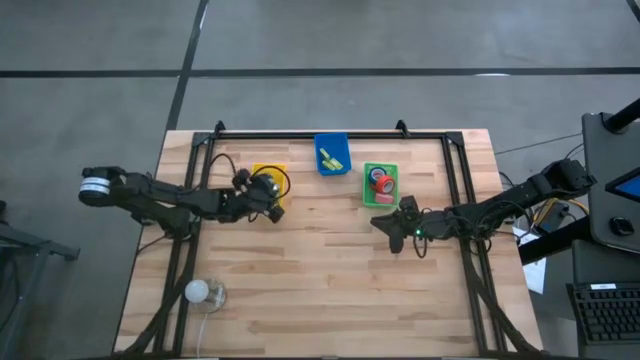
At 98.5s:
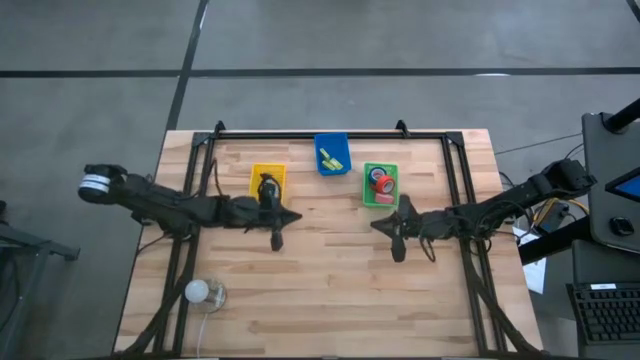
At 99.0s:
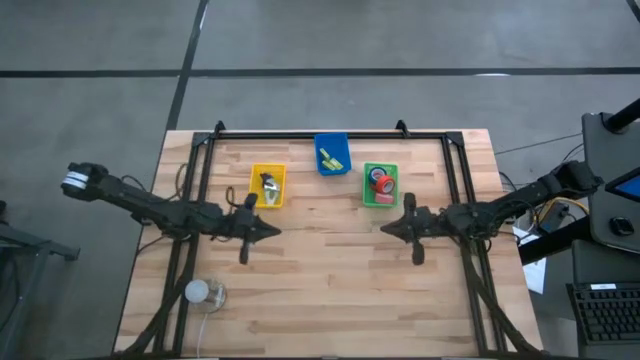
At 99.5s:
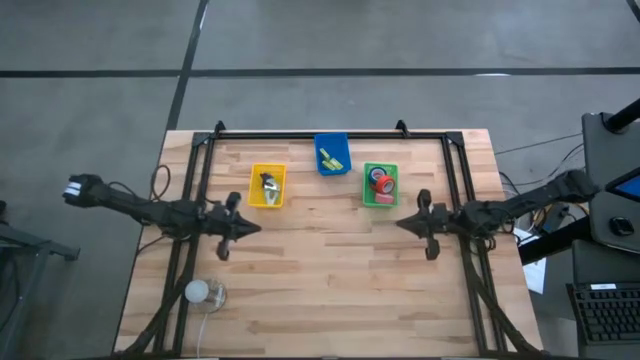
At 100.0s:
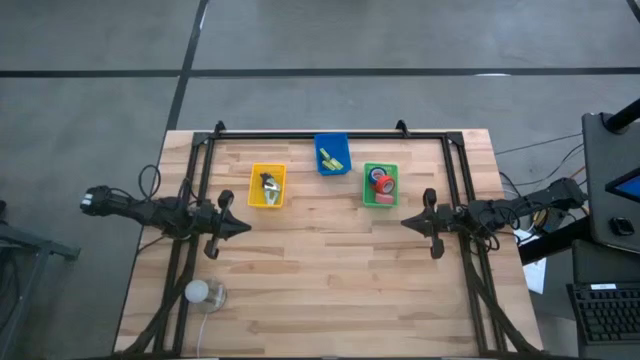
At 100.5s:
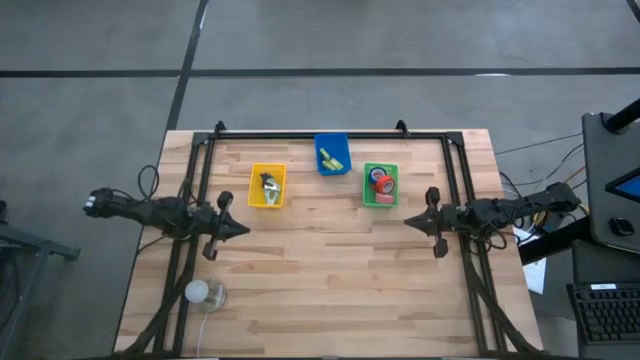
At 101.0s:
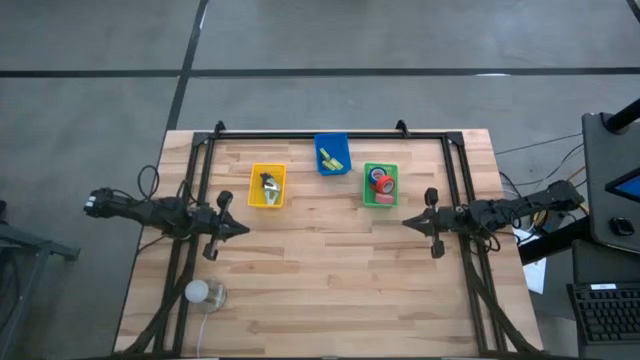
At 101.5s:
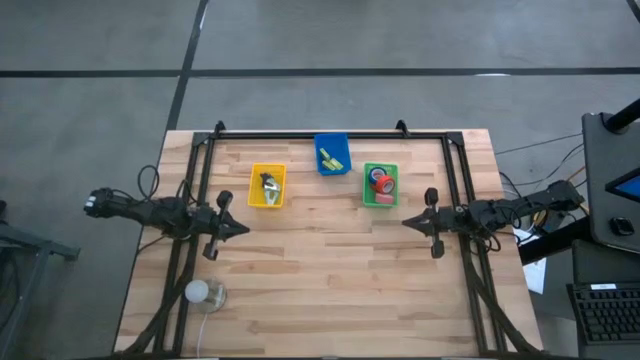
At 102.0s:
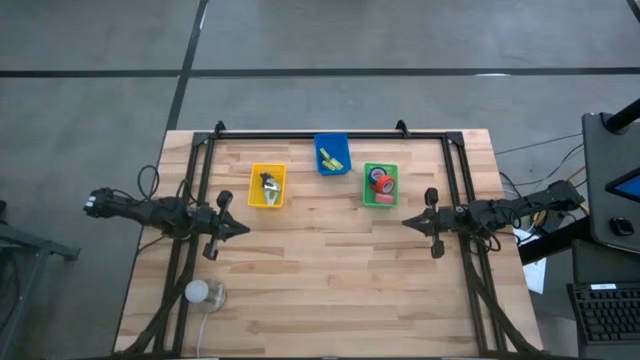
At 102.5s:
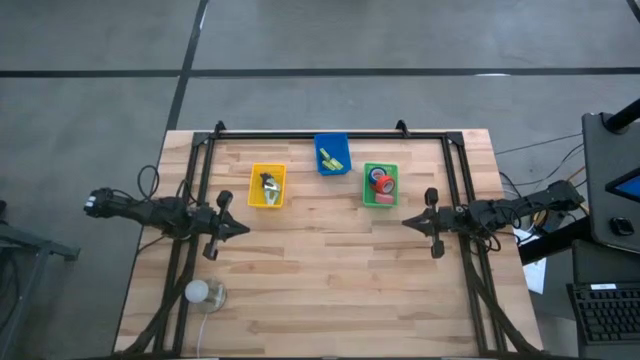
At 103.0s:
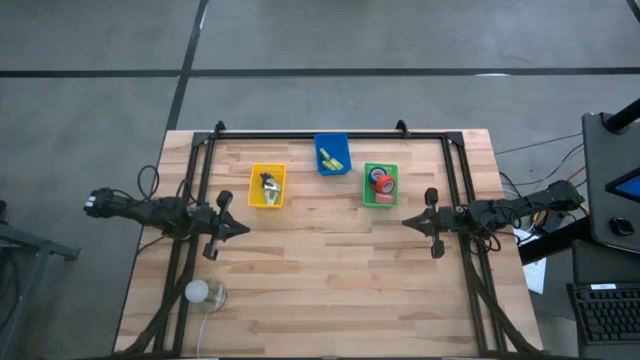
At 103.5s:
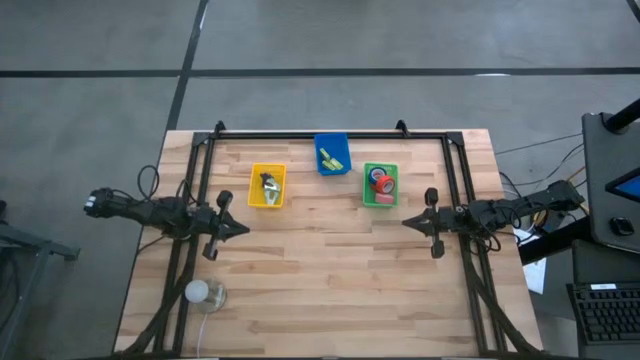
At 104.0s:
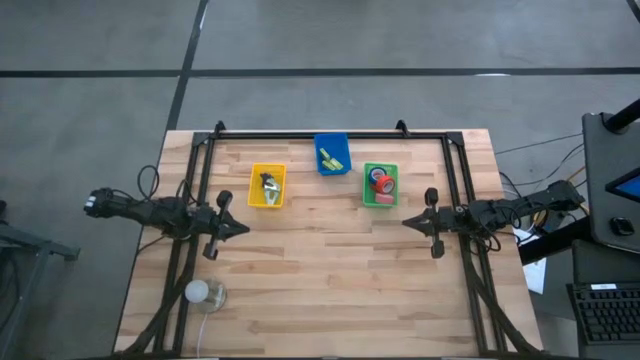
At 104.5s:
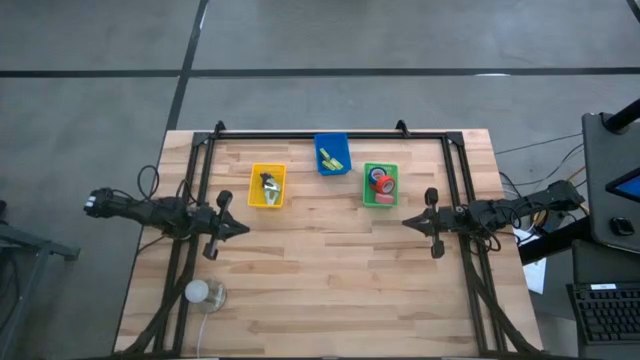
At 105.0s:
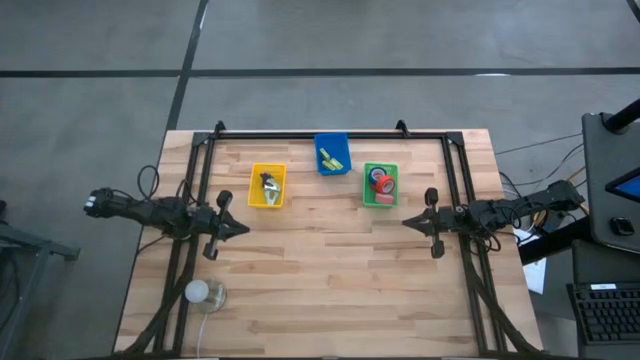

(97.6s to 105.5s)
Task: Pick and place Stapler, Stapler remover, tape
Return to Home Position

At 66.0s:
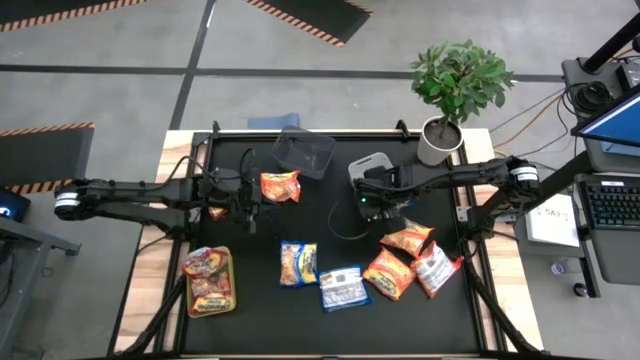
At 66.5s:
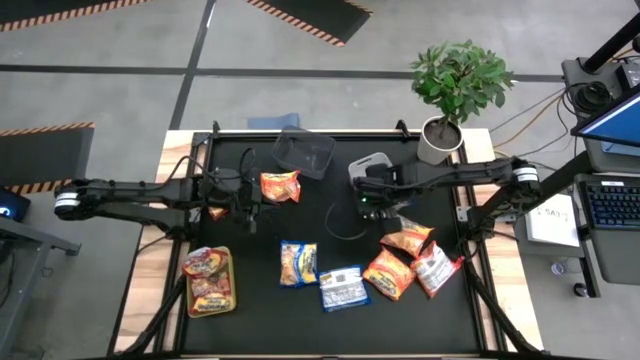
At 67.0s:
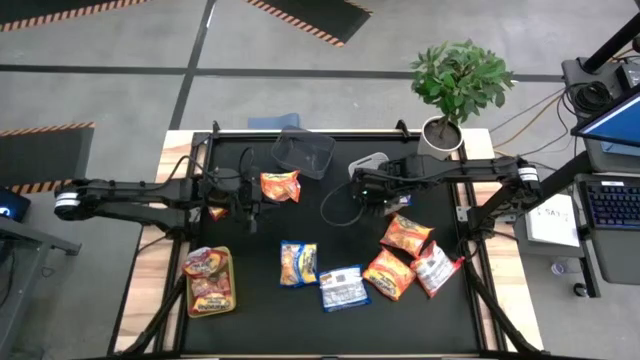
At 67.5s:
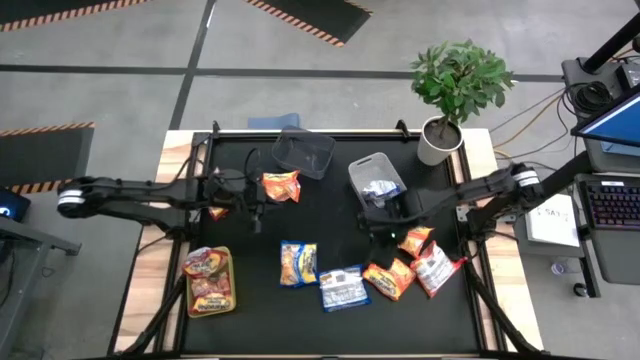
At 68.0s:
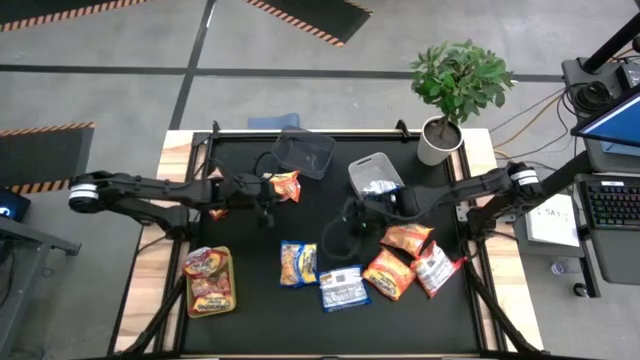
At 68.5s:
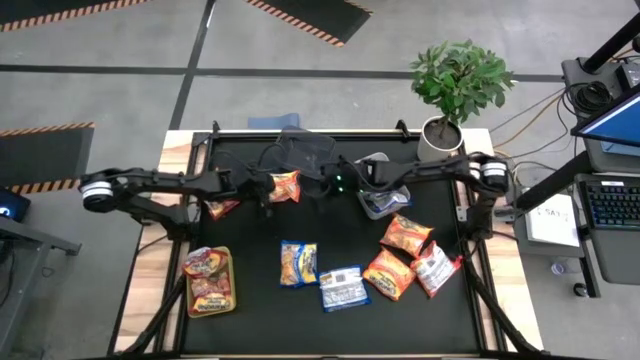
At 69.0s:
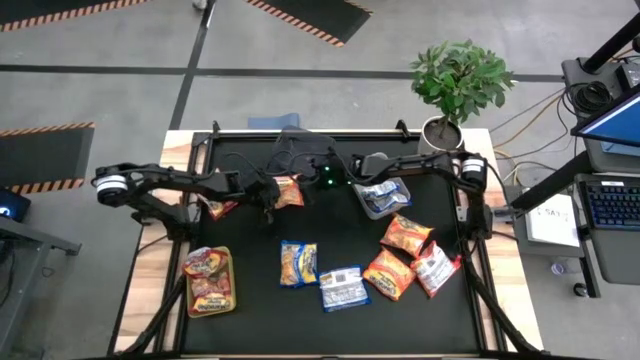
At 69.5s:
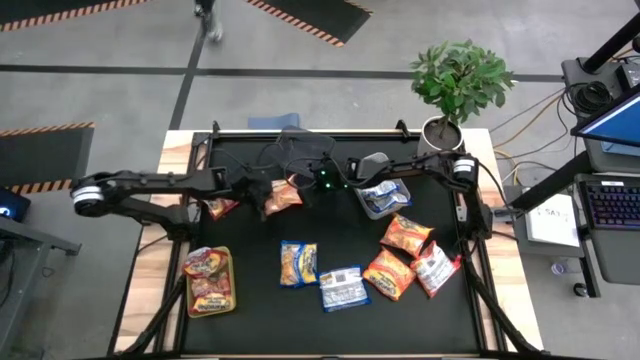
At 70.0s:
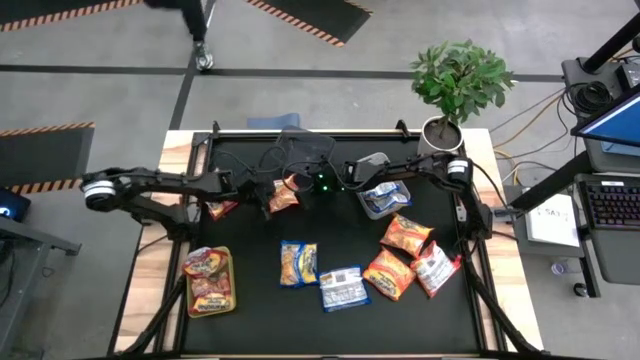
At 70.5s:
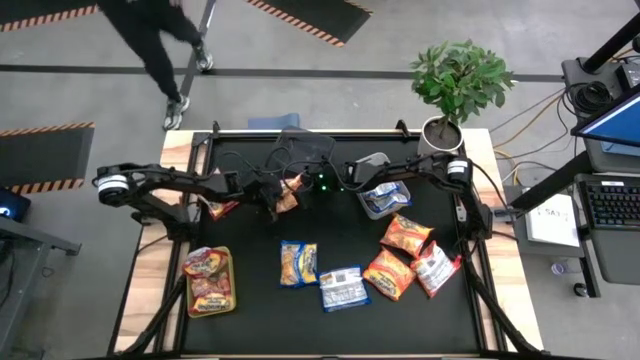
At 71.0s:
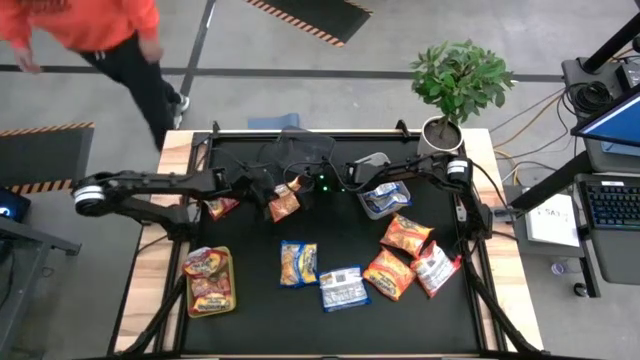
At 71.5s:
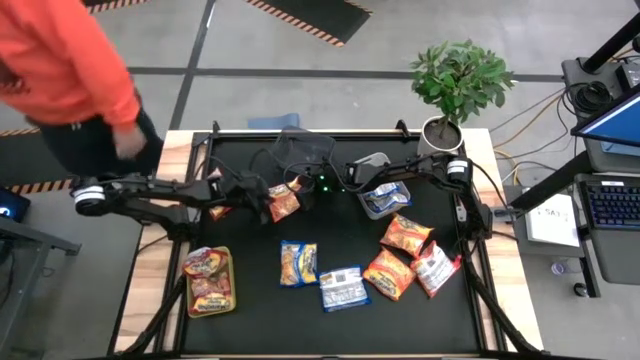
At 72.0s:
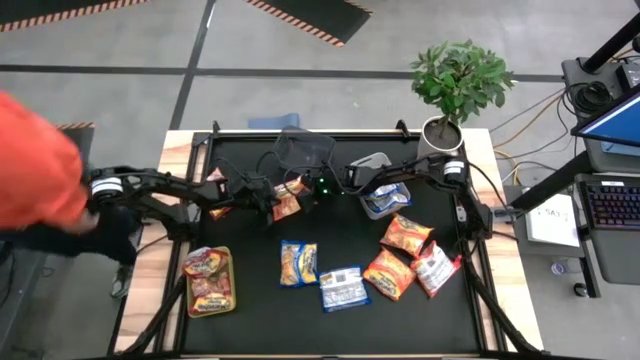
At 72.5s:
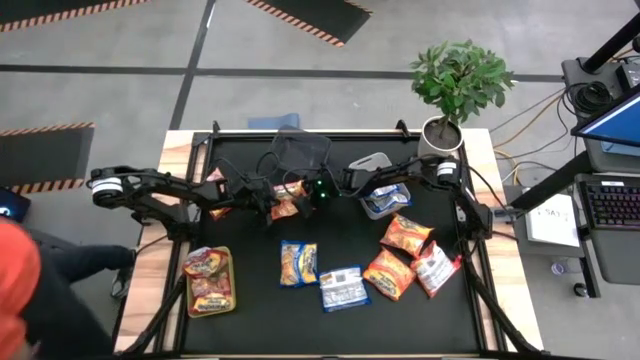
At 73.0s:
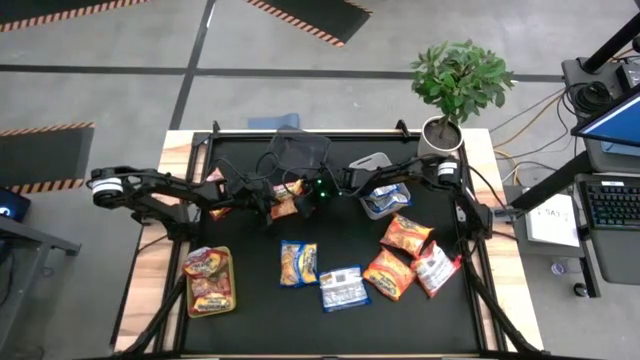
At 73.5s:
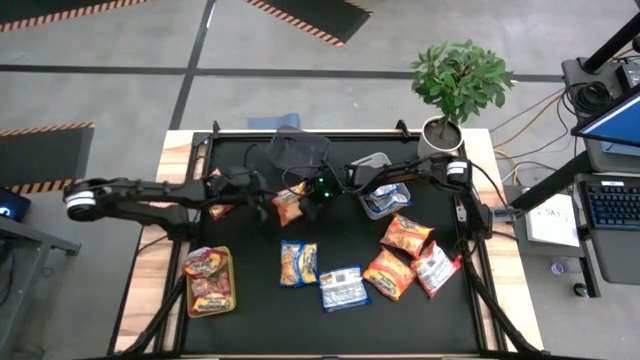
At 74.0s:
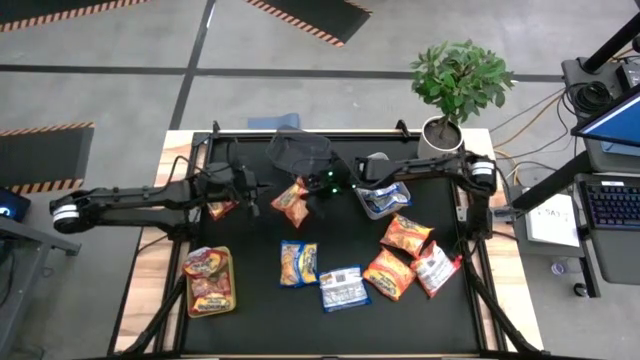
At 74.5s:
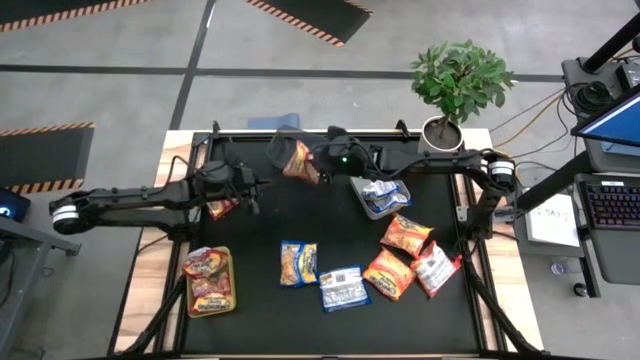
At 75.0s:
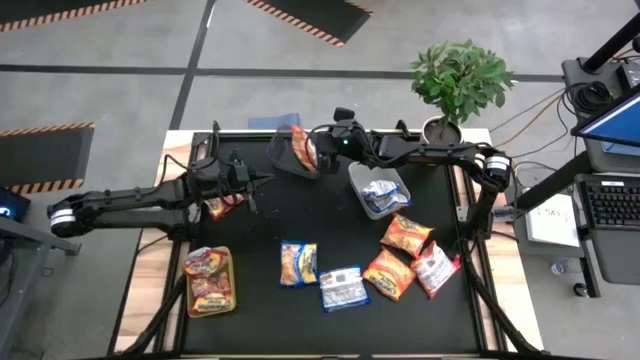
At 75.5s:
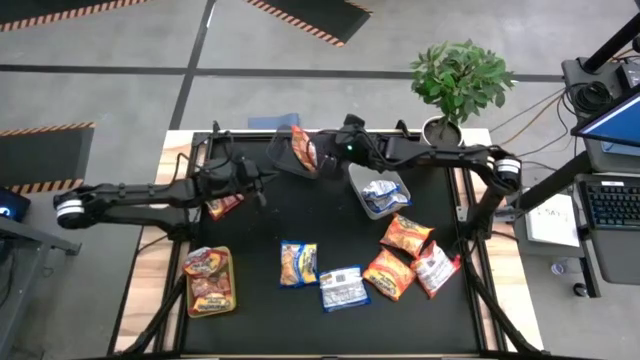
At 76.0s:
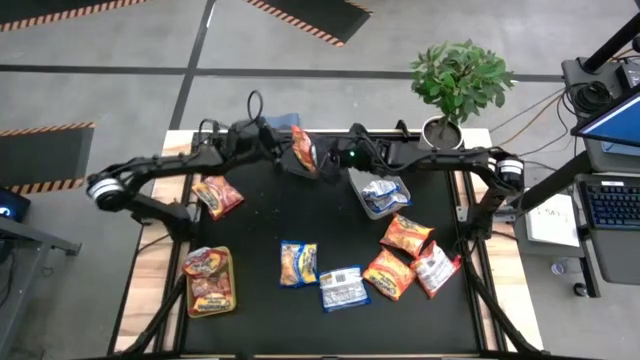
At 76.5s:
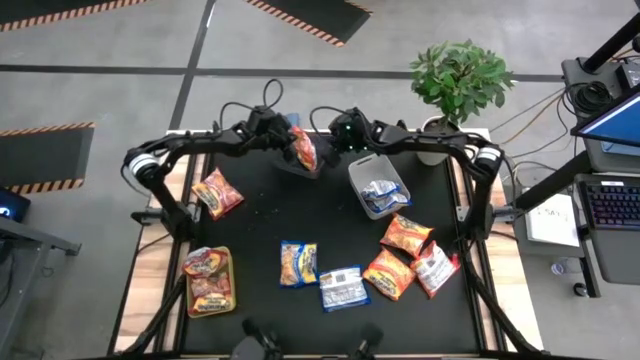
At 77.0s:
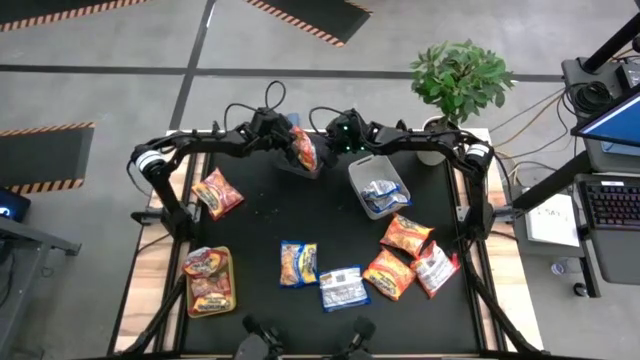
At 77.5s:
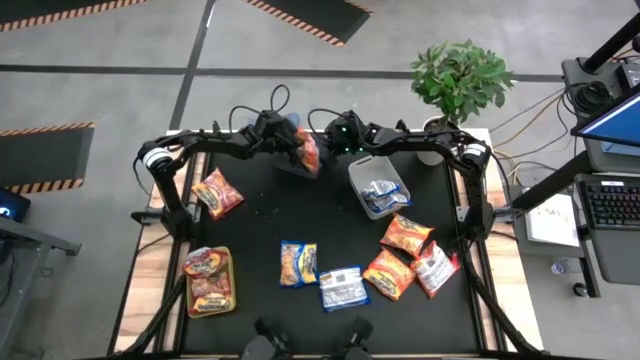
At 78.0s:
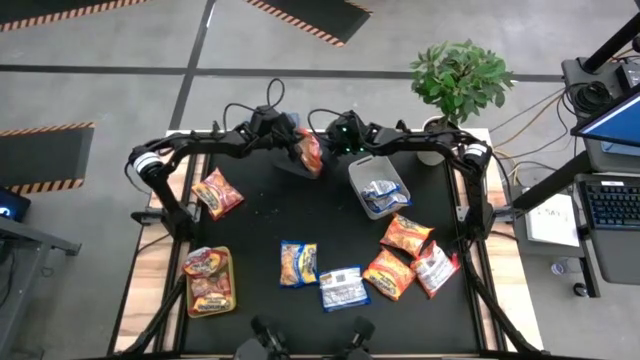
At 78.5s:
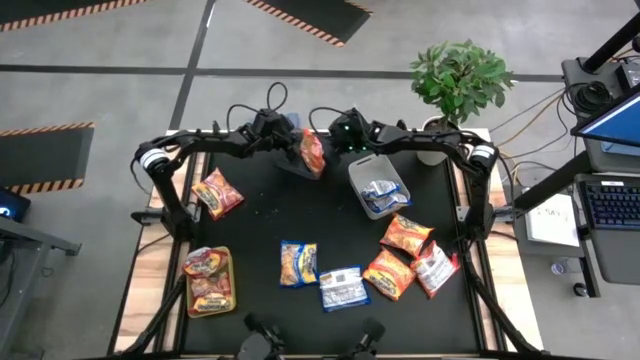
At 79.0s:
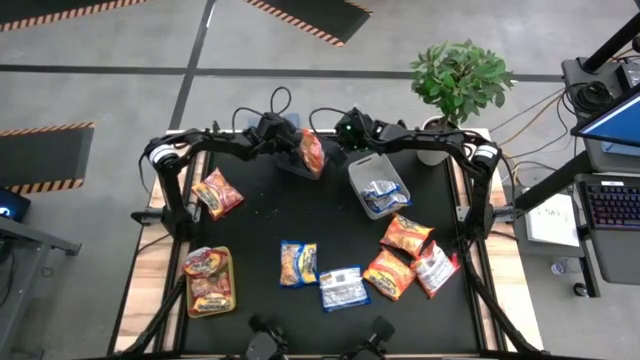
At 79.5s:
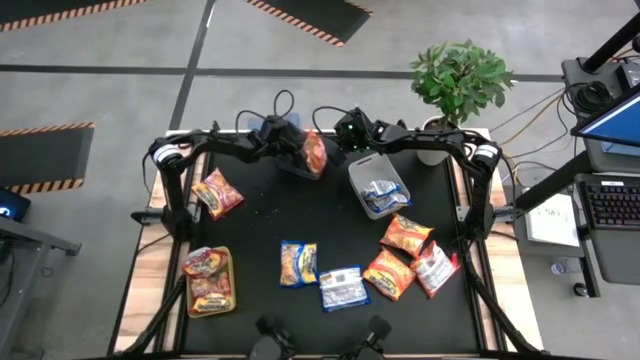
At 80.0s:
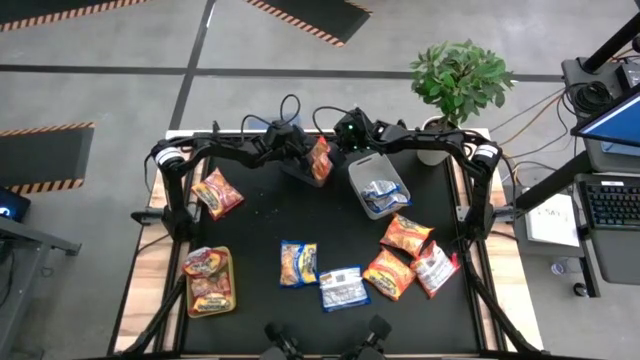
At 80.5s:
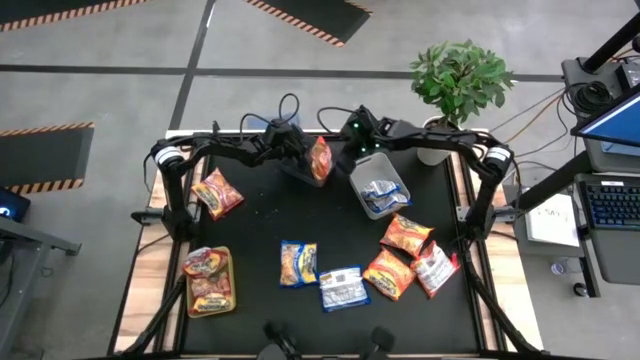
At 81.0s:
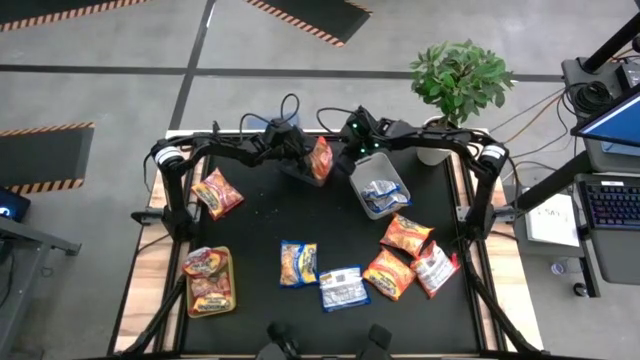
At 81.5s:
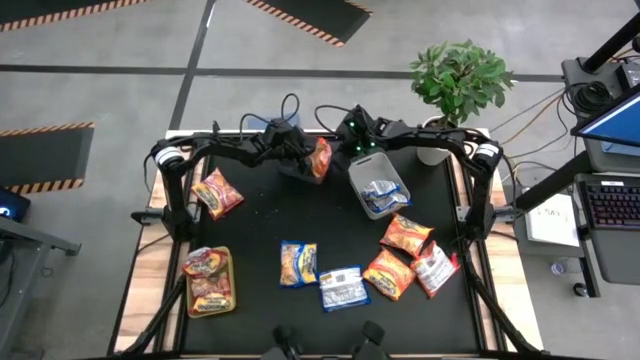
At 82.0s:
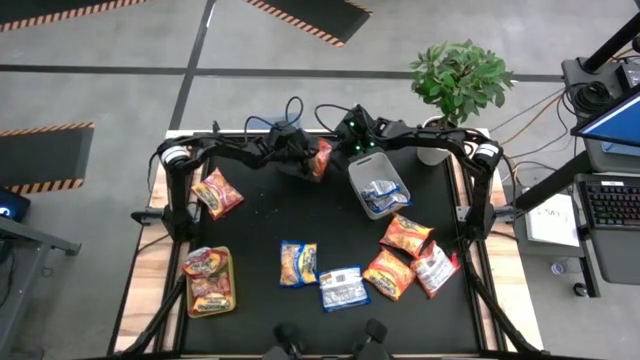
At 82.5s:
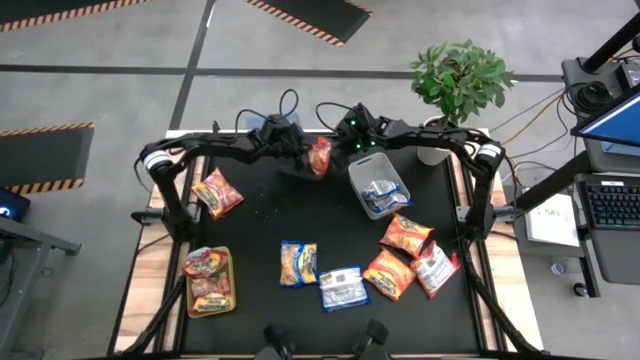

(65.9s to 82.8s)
Task: Sort Maruchan noodles
Put the orange noodle pack into the black bin
